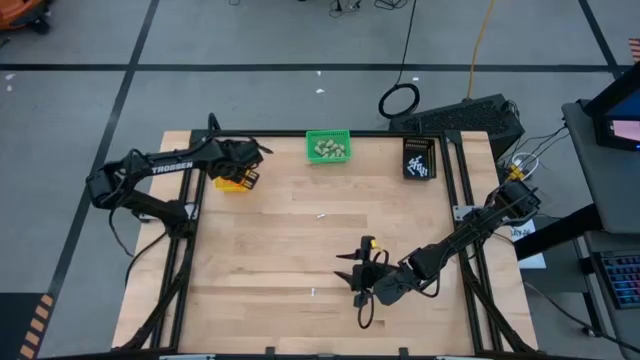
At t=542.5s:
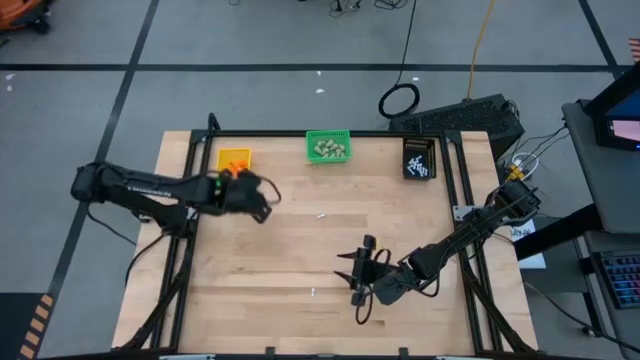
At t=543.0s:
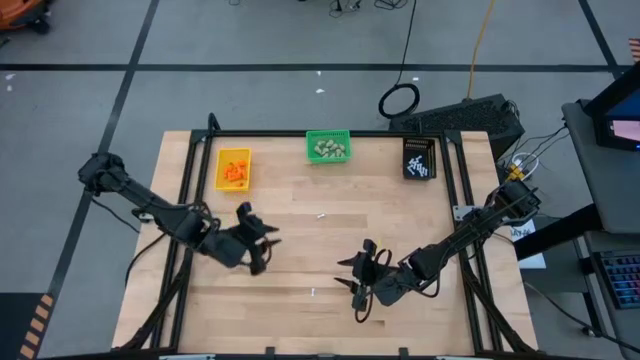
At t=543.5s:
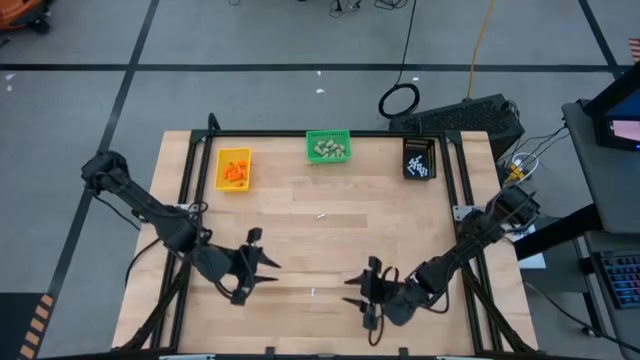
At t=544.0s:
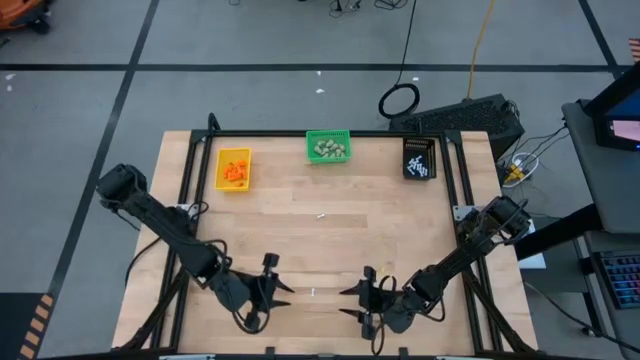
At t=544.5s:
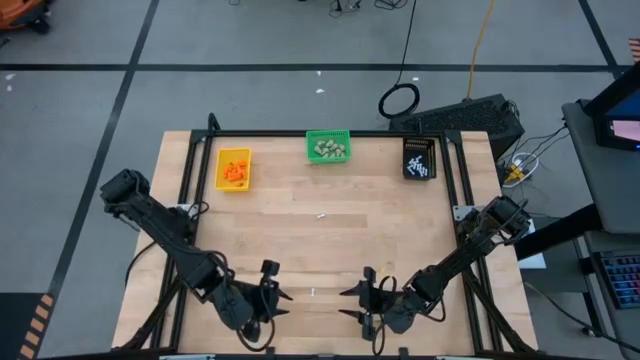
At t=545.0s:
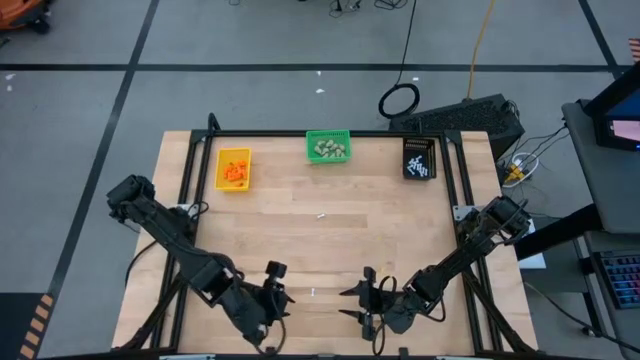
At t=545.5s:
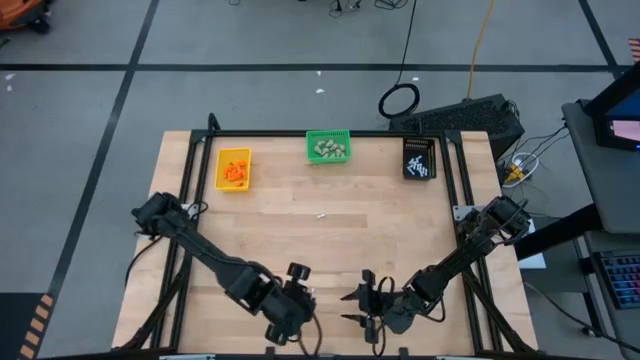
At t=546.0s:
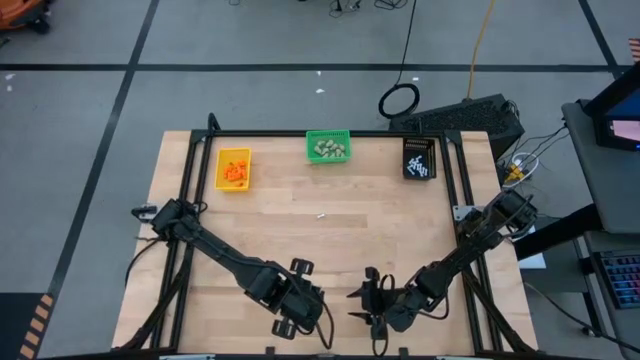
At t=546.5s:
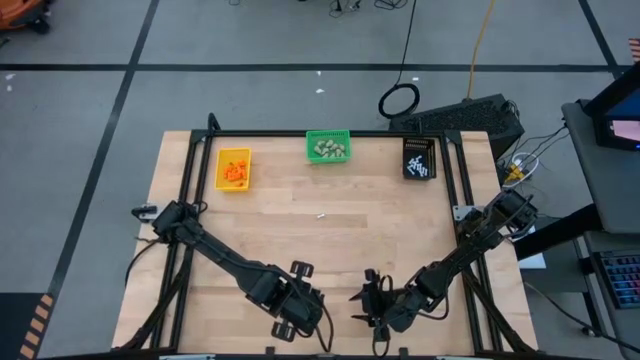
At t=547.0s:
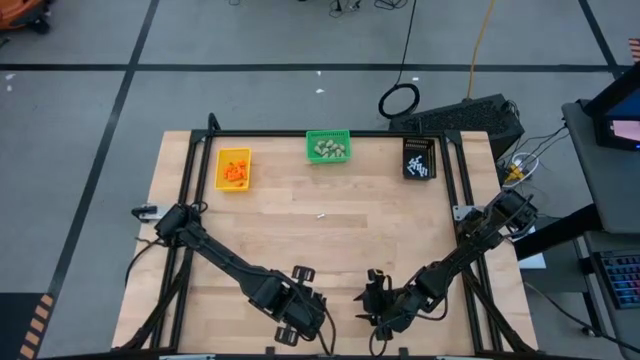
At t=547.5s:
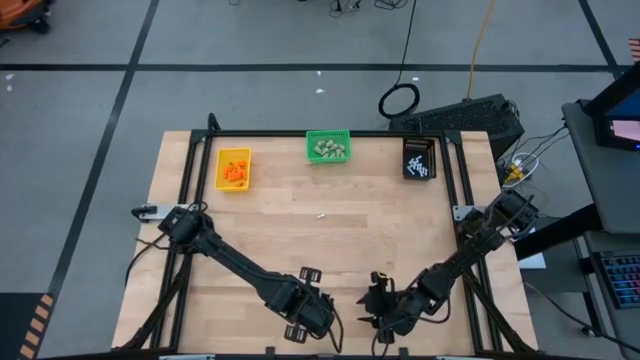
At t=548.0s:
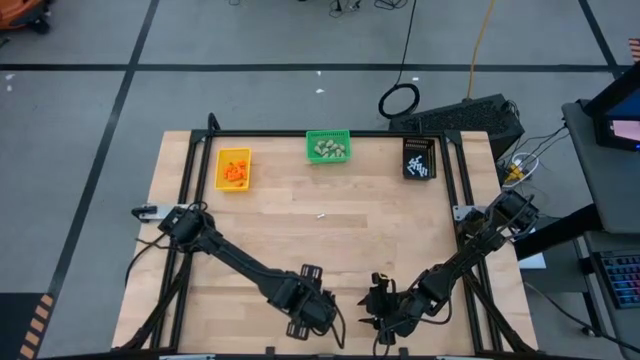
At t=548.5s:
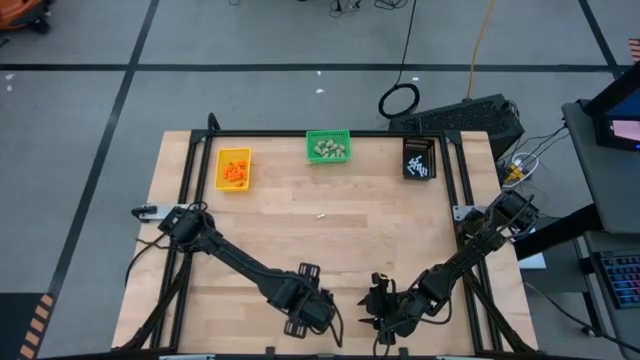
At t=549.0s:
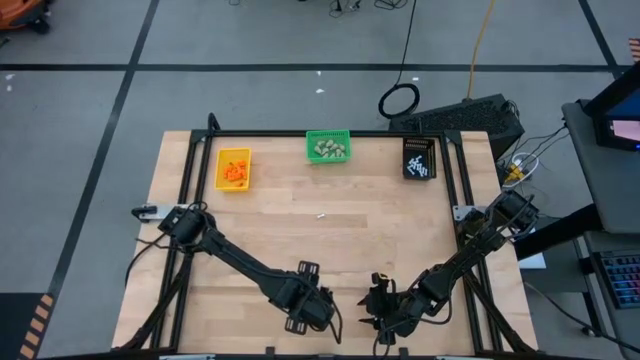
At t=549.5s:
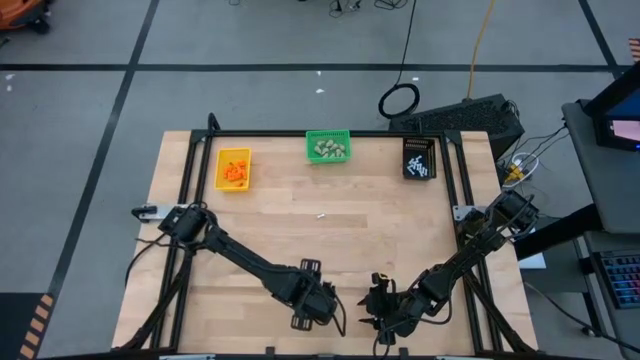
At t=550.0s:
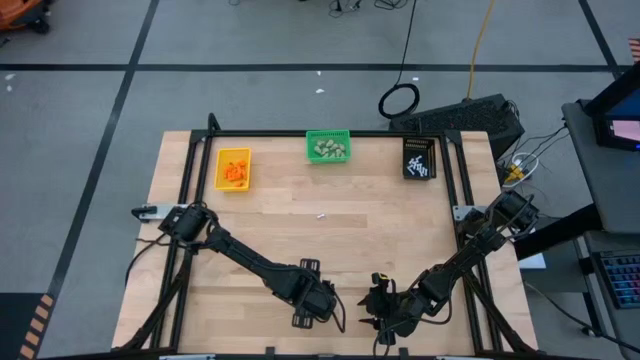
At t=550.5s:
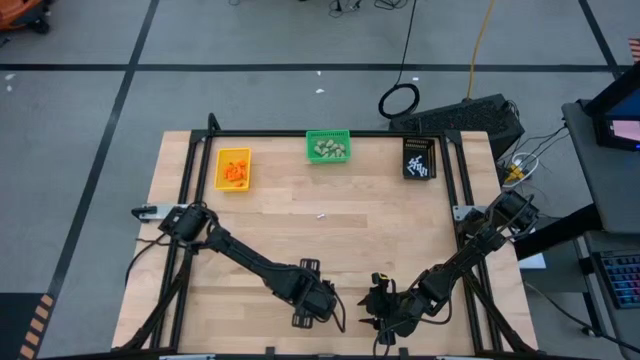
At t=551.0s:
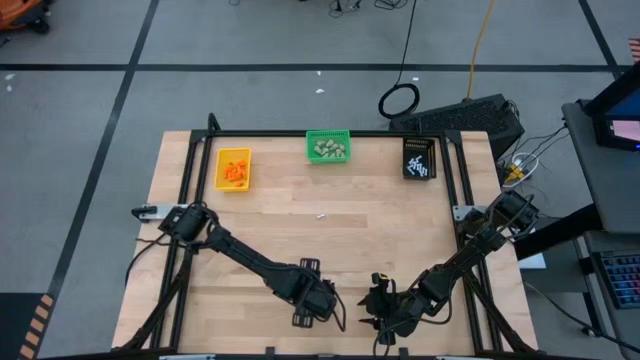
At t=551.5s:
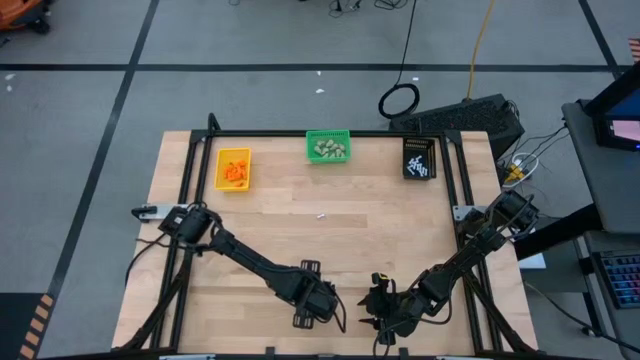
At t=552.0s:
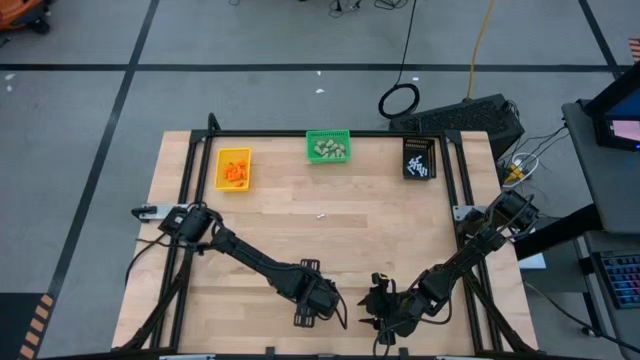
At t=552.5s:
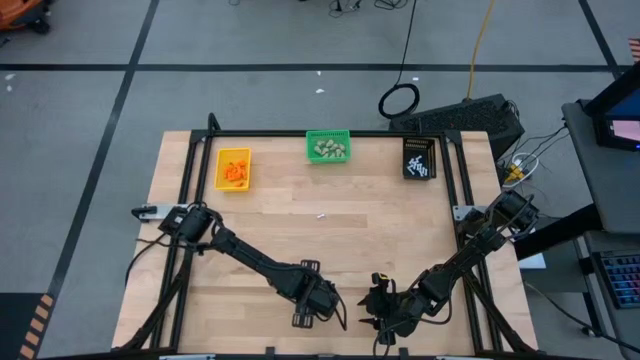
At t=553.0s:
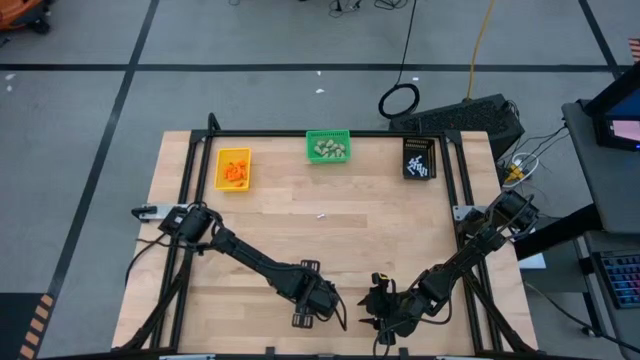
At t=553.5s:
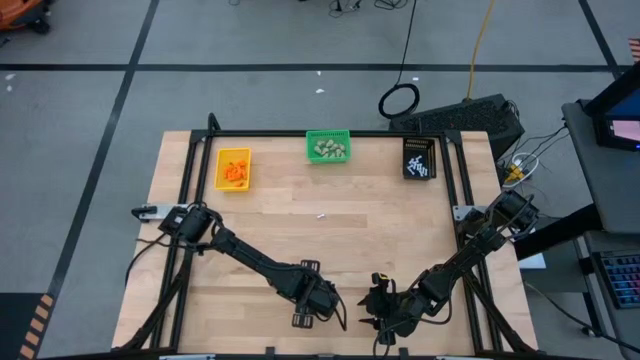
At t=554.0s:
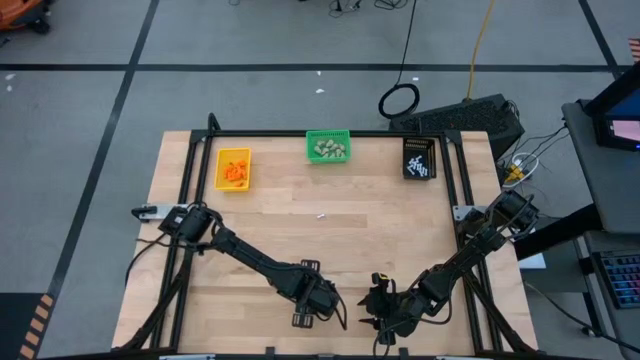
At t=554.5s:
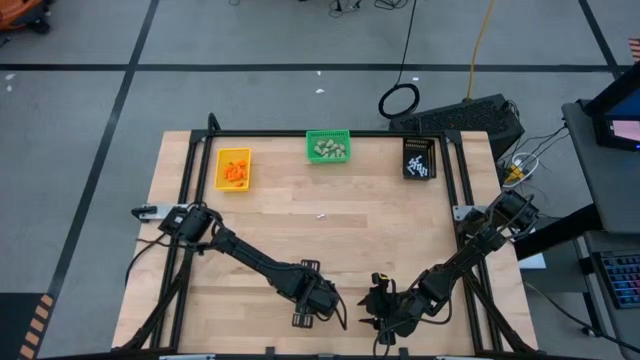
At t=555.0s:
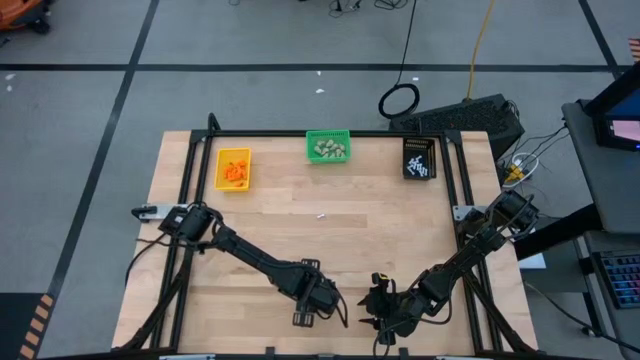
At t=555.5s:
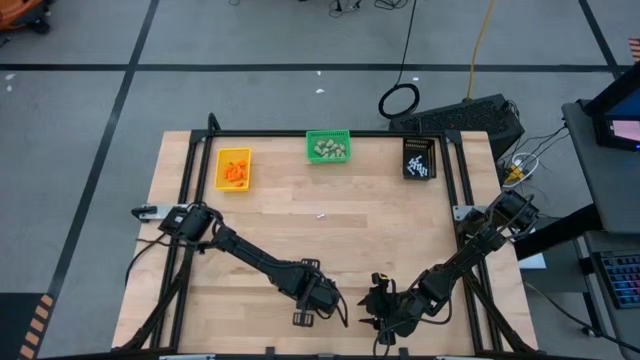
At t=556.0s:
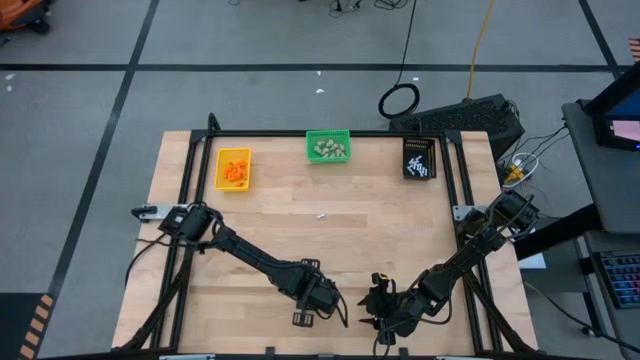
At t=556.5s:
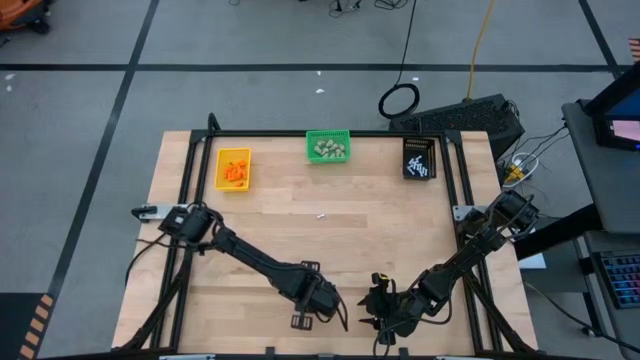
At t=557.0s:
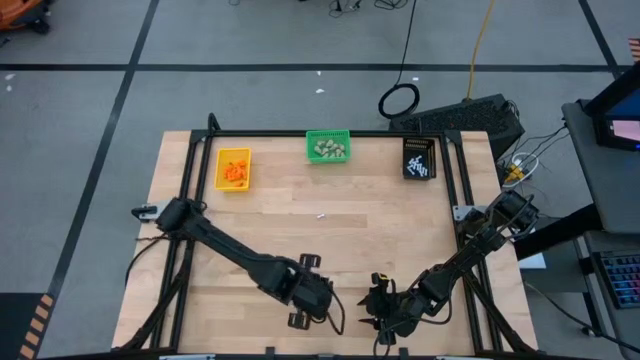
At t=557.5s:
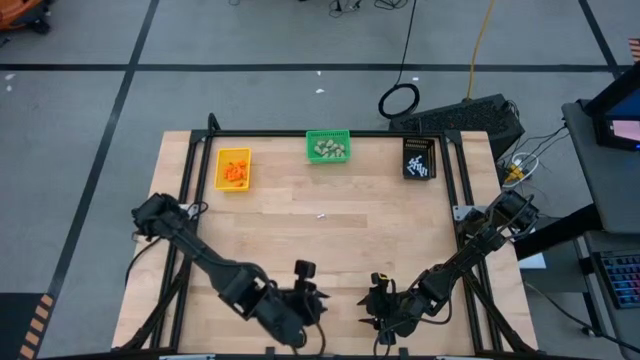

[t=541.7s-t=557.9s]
Task: Sort Halloween decoration
Put the white bone toy into the black bin

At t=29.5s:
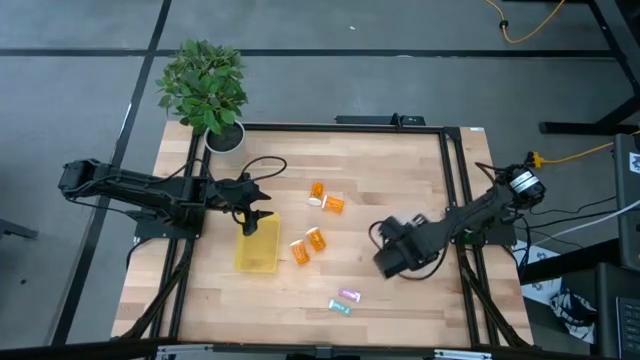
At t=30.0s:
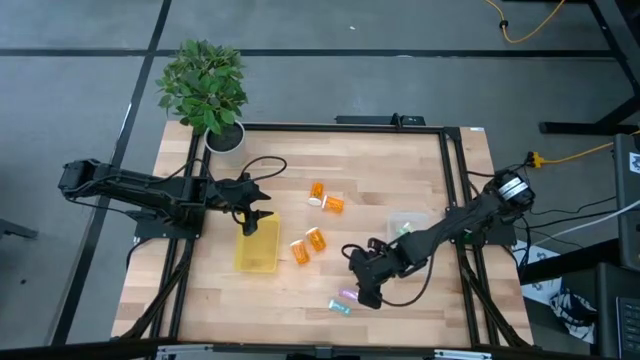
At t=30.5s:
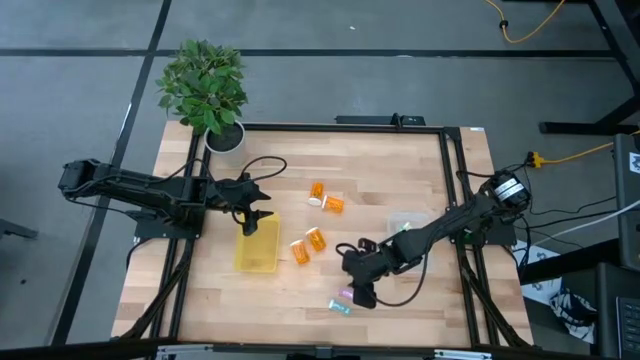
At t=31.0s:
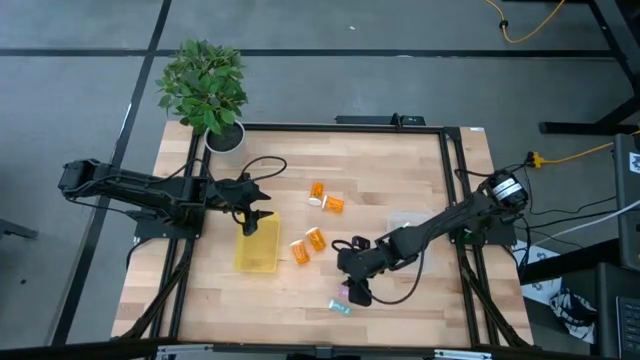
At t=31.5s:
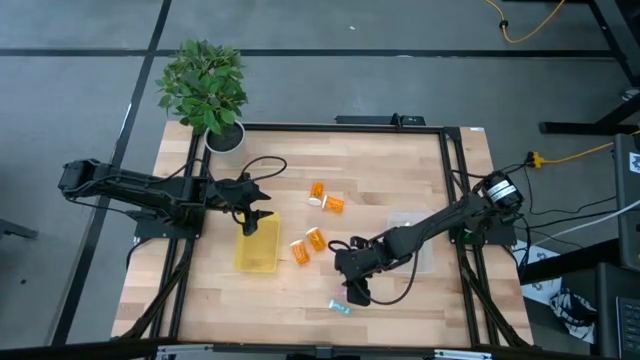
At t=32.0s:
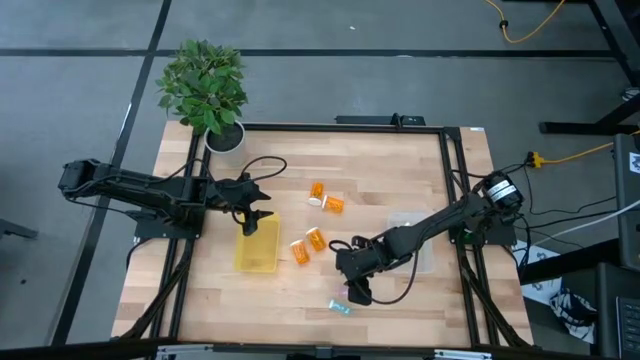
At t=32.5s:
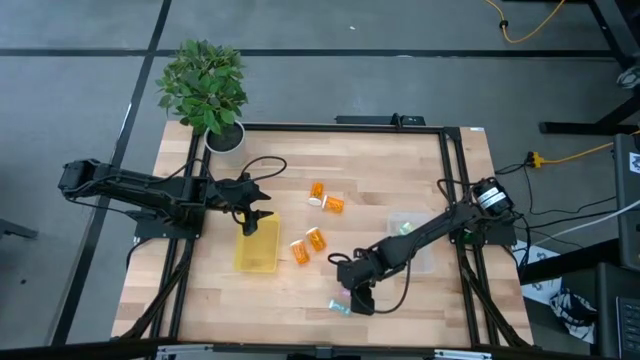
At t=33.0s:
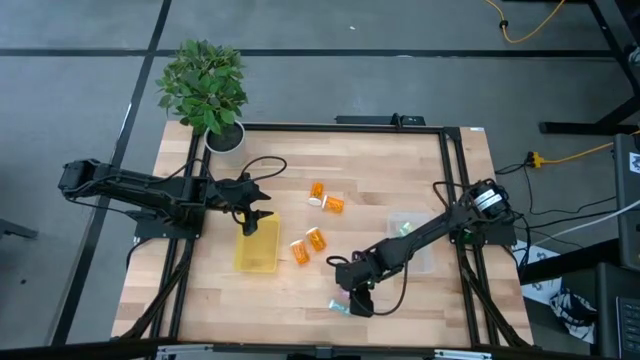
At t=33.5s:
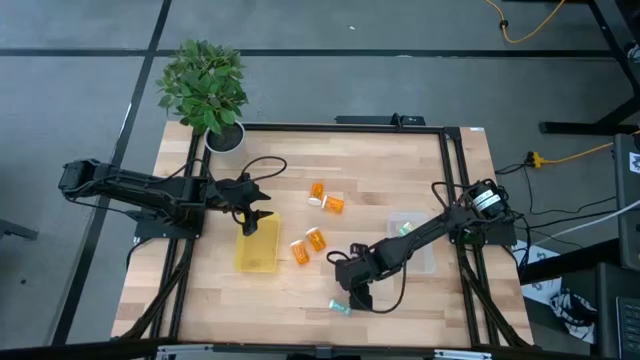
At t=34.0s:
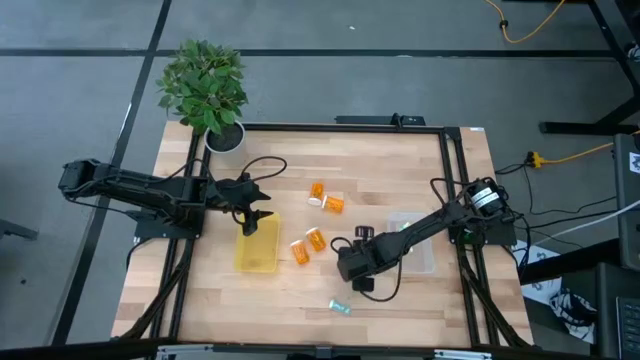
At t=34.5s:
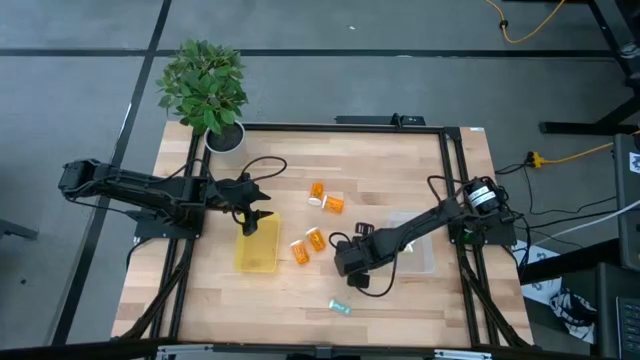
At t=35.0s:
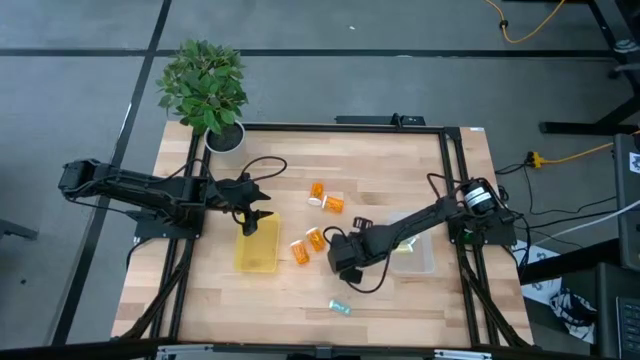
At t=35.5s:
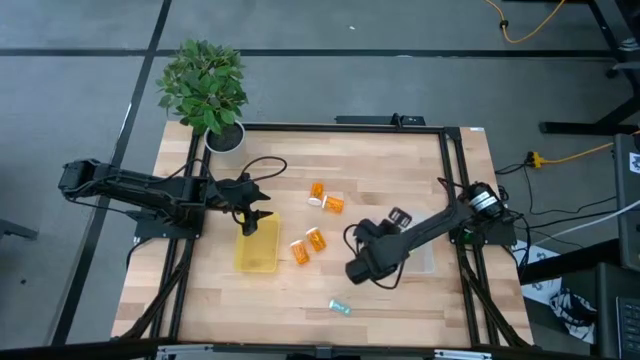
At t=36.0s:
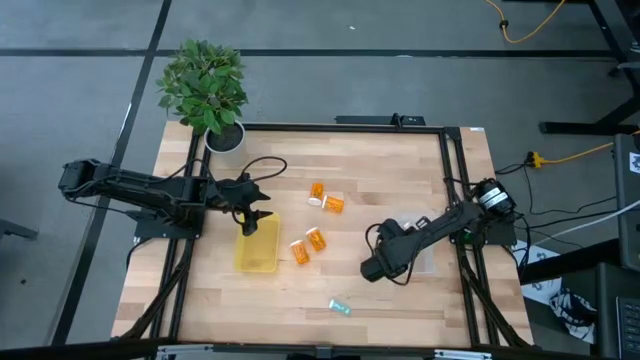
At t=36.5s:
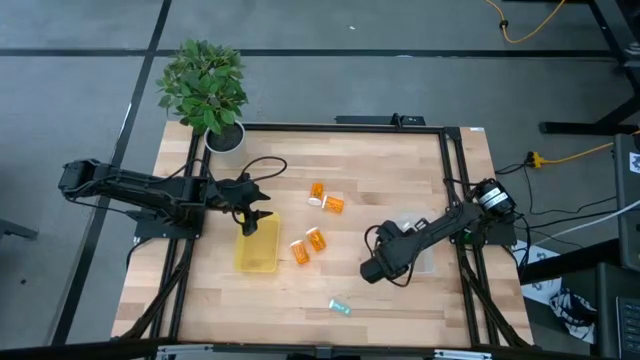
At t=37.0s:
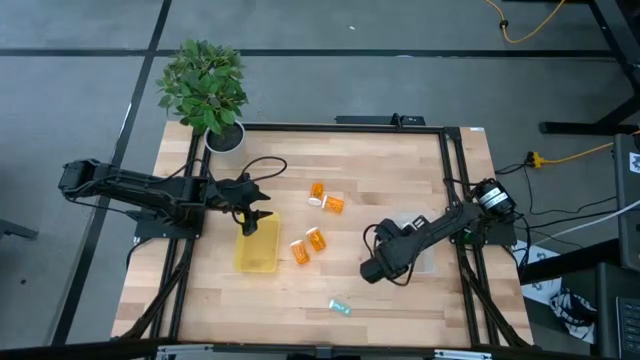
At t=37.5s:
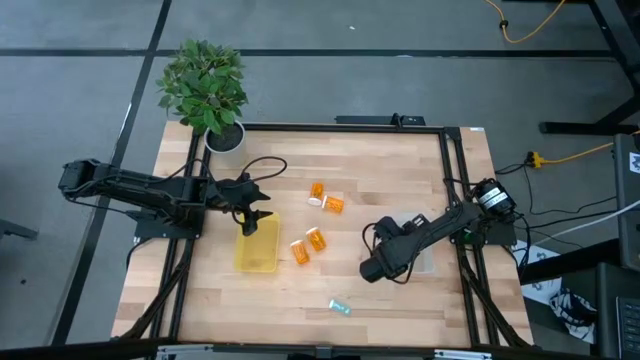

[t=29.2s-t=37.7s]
Task: Pick and place medicine bottles into bin by pill shape (circle, oval)
Put the pink pill bottle into the transparent bin
